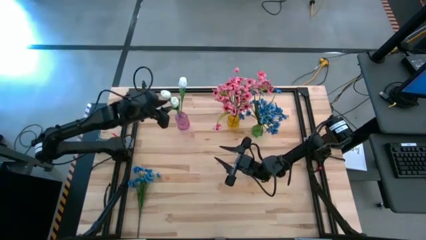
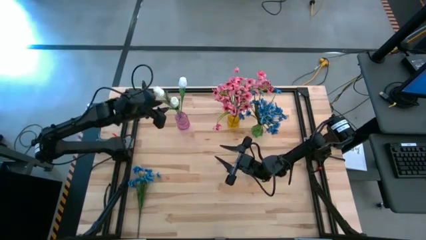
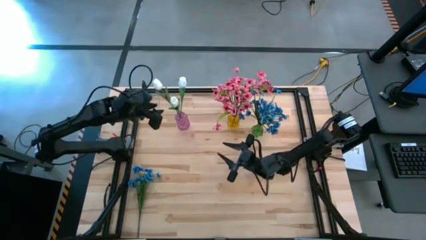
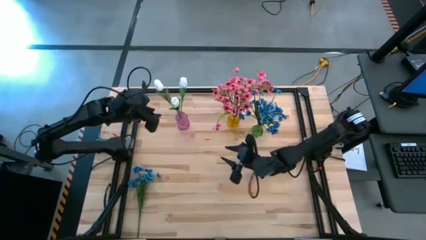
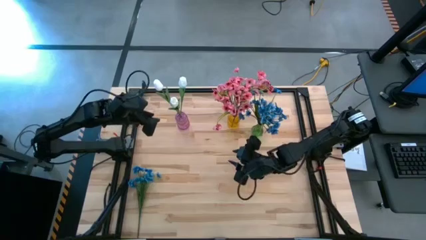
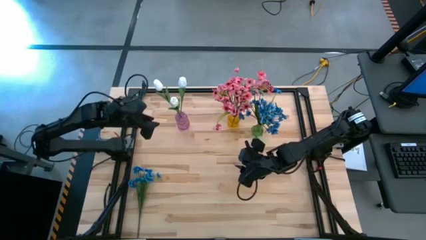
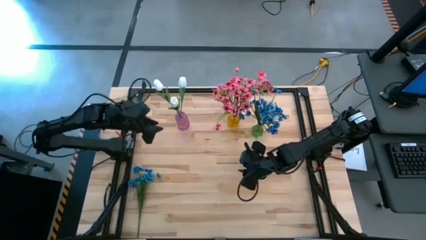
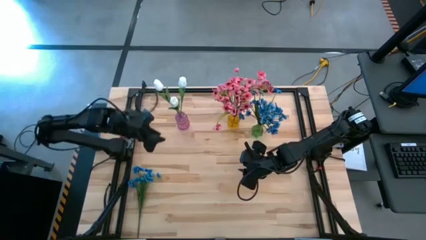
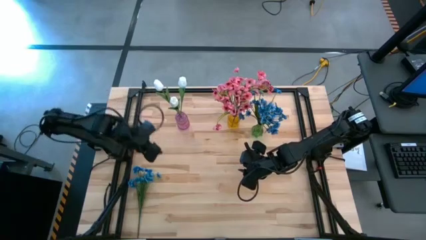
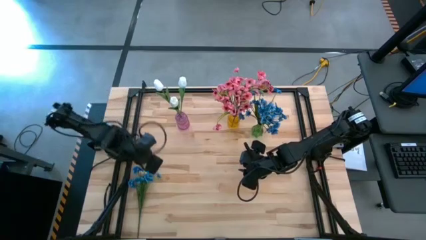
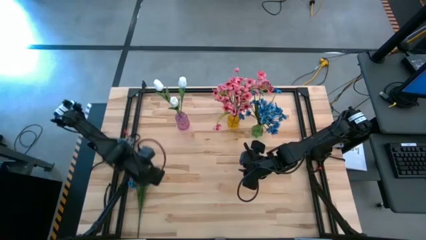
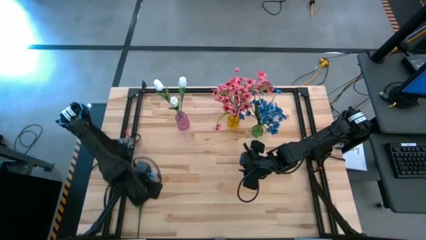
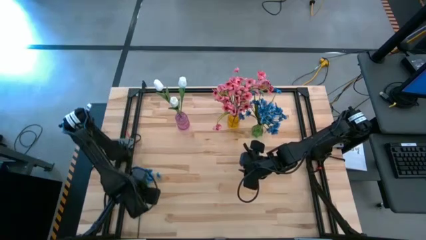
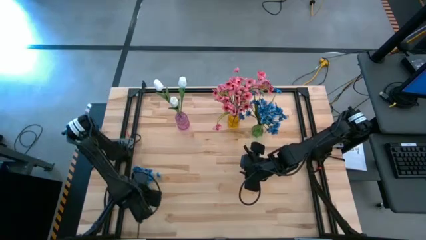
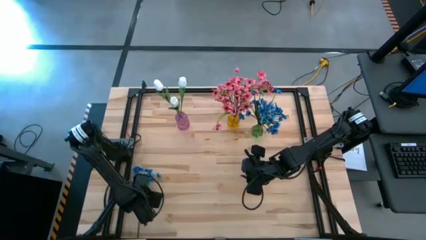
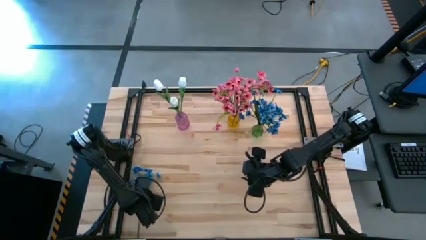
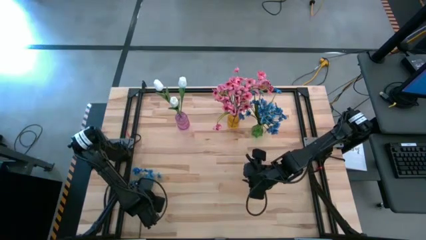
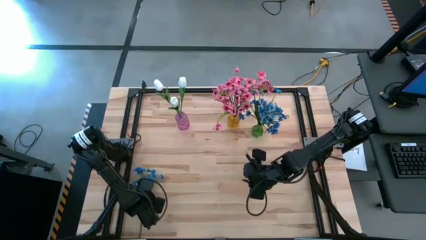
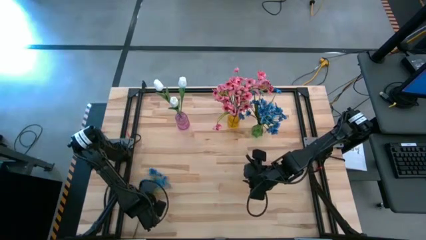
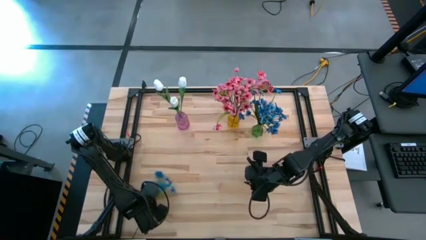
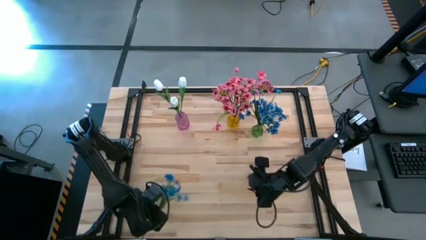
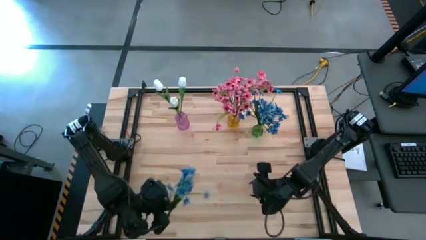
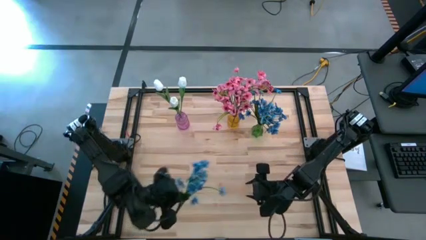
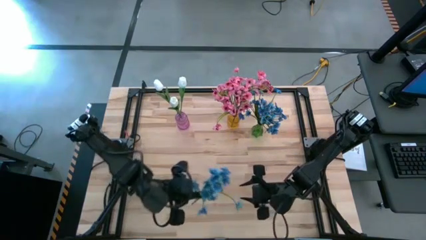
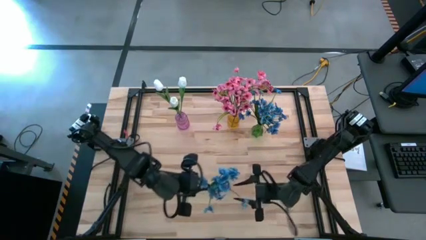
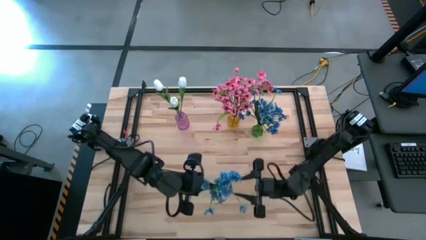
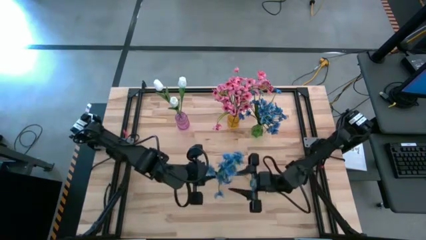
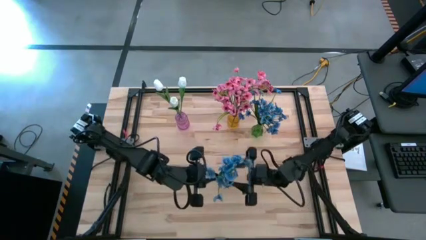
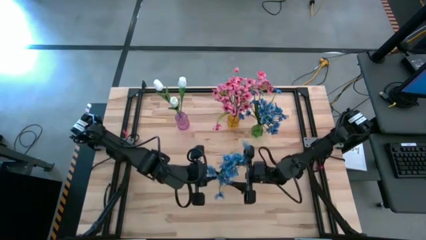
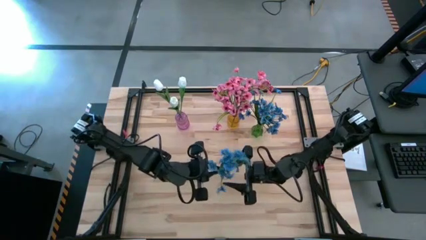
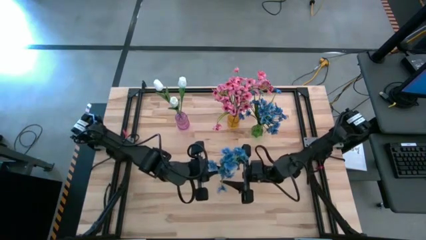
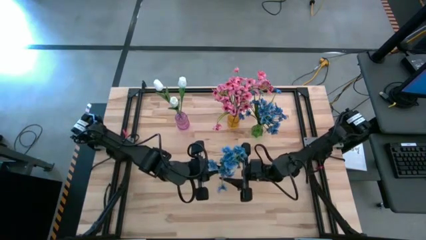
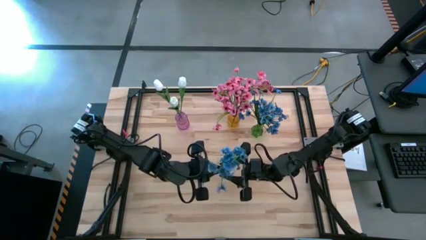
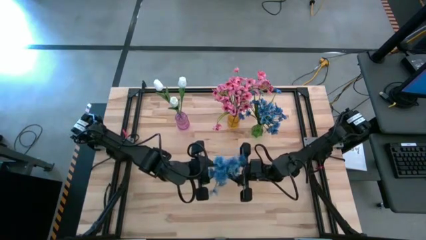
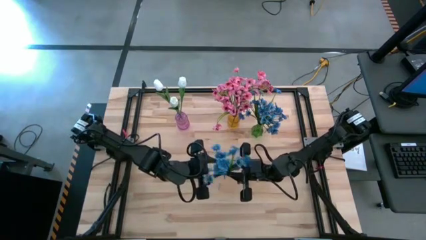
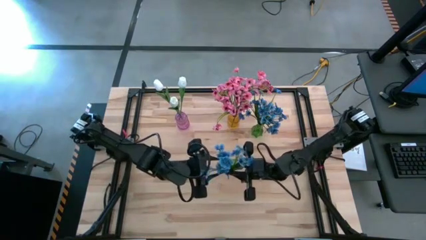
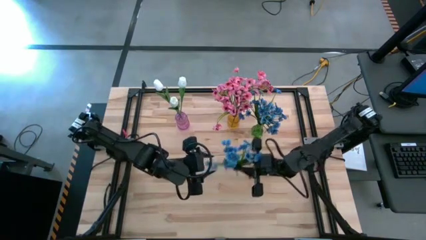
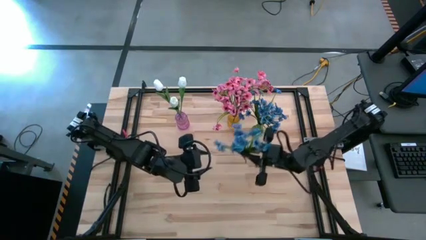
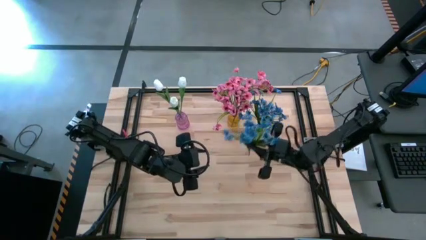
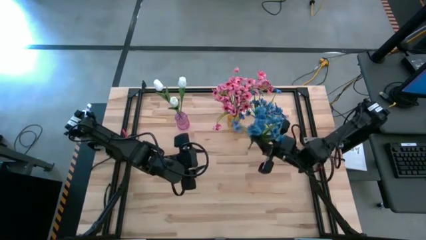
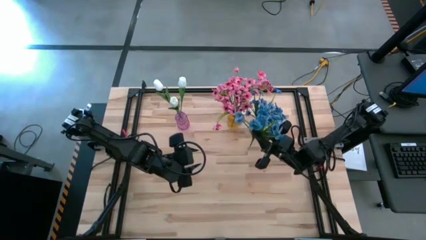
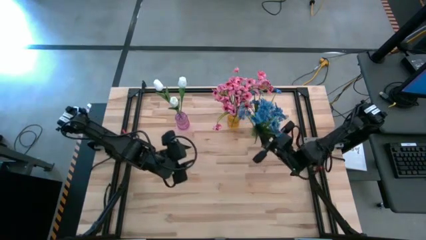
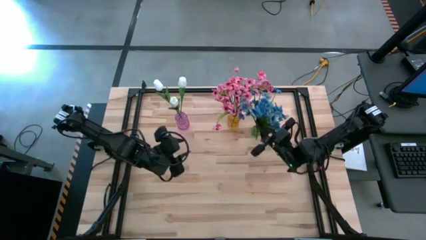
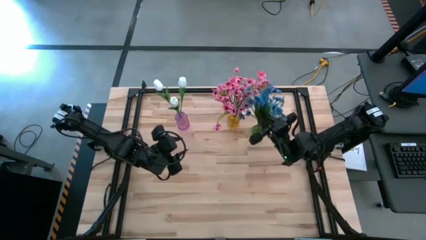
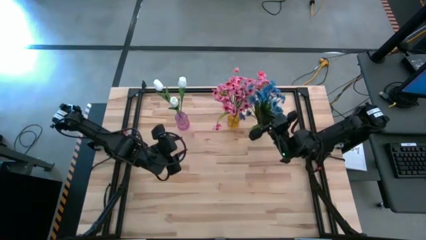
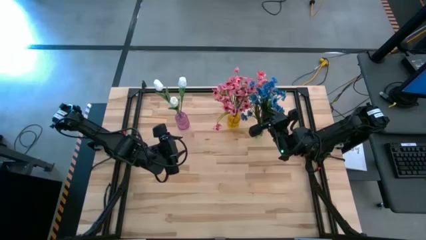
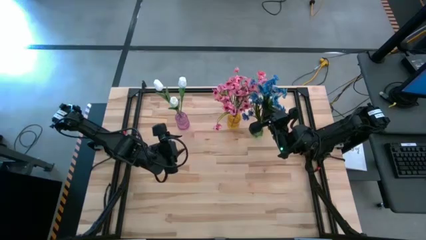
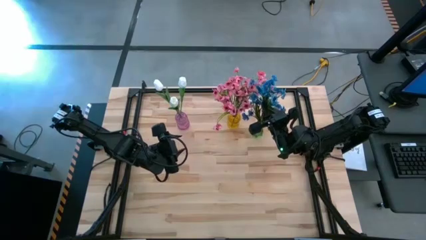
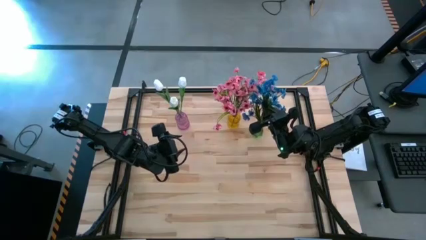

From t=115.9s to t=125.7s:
Task: Sort flowers into vase by color
Put the blue flowers into the green vase

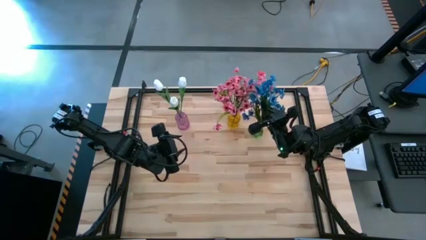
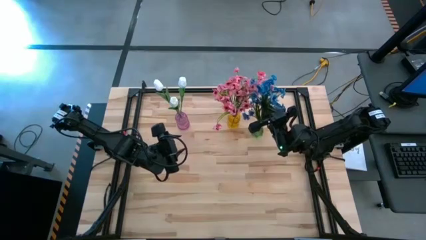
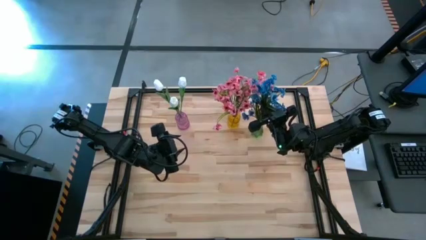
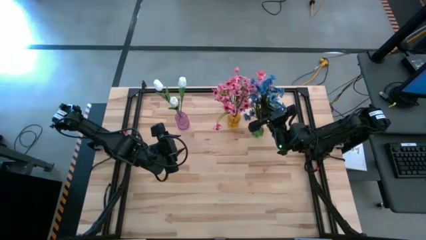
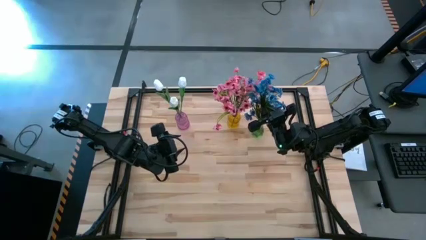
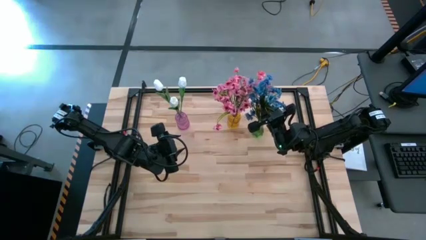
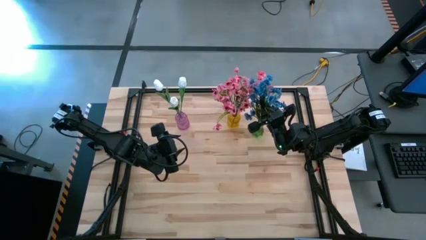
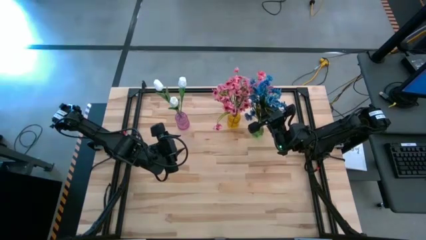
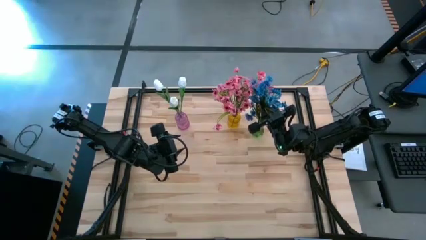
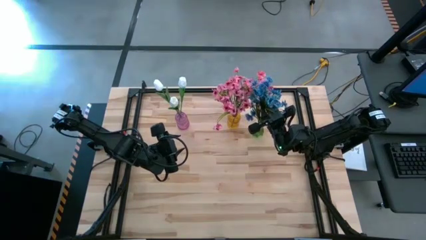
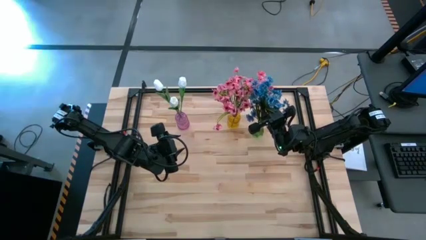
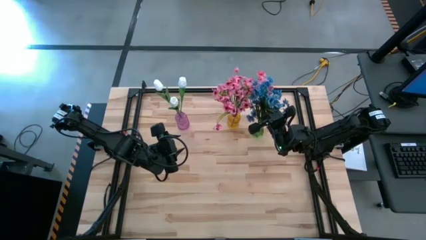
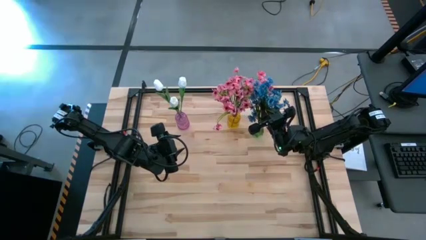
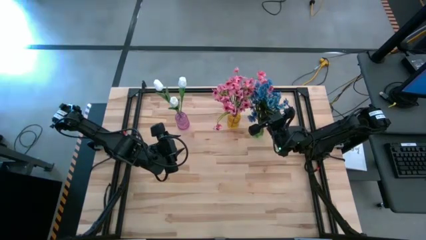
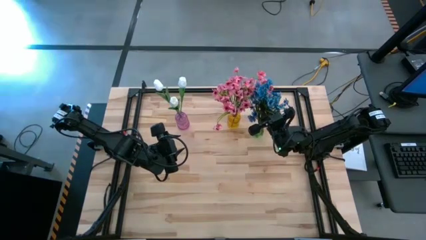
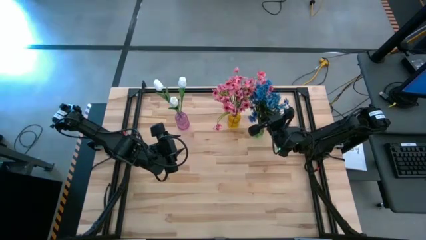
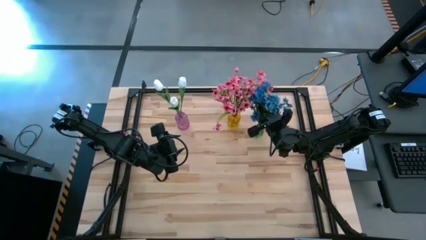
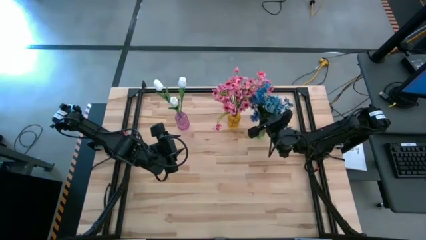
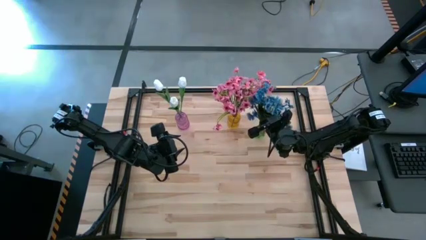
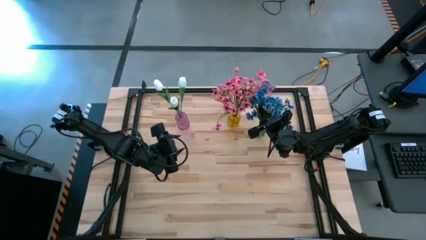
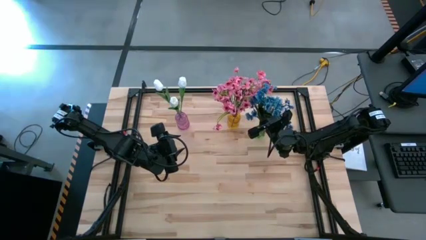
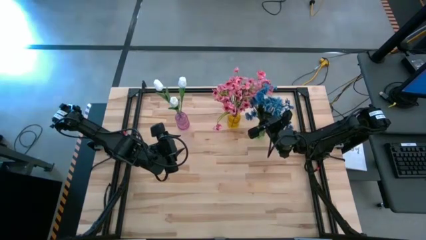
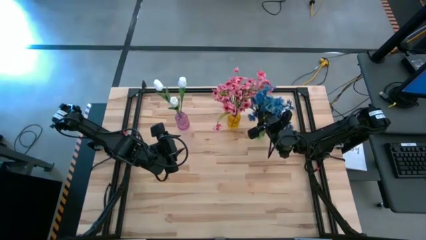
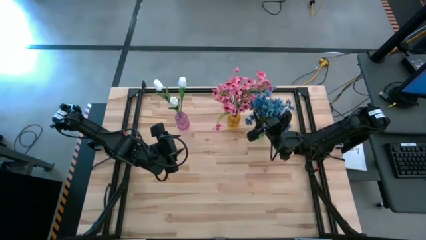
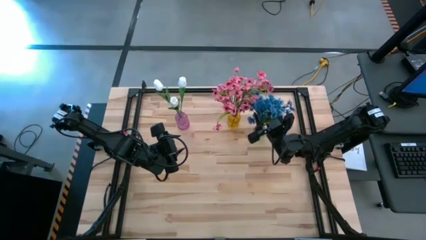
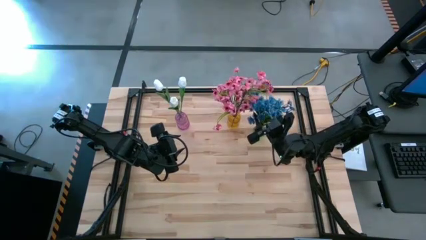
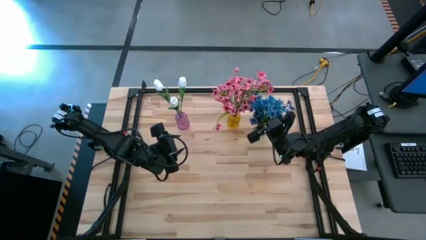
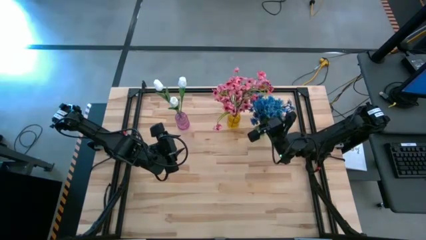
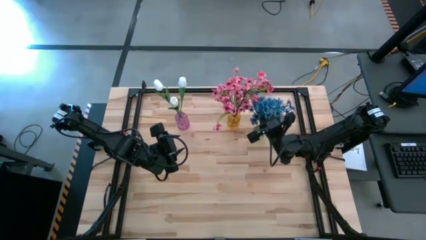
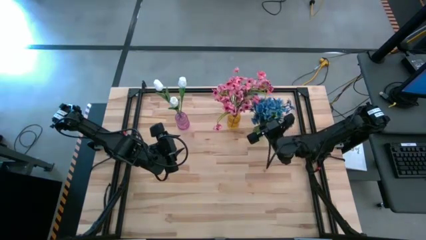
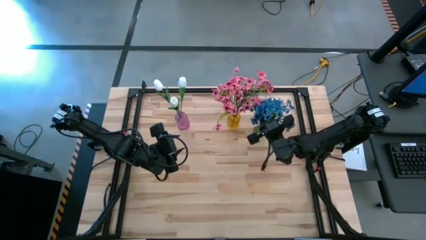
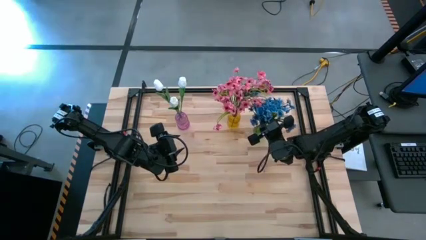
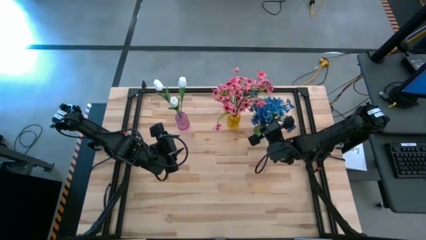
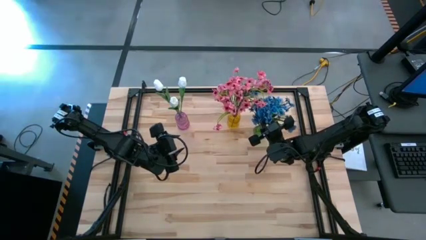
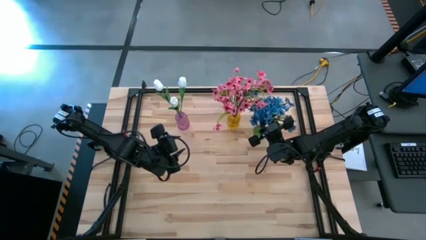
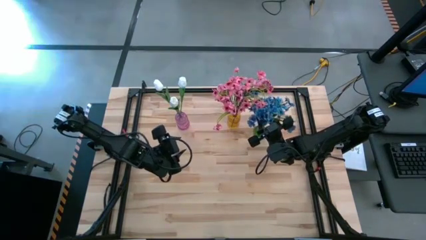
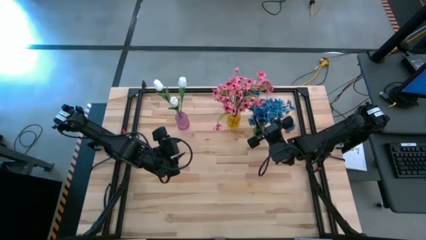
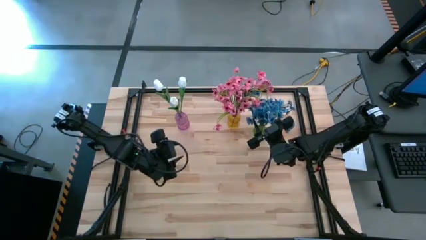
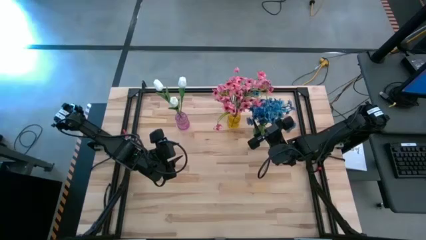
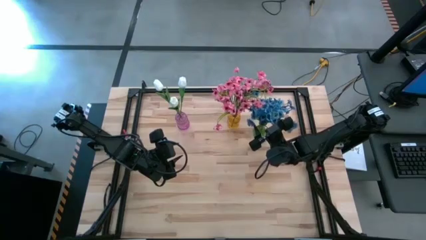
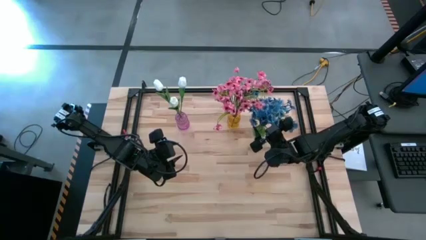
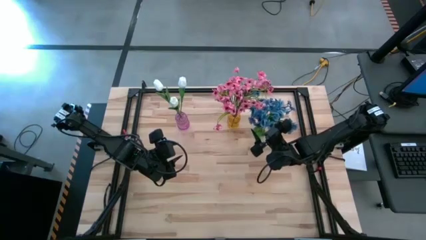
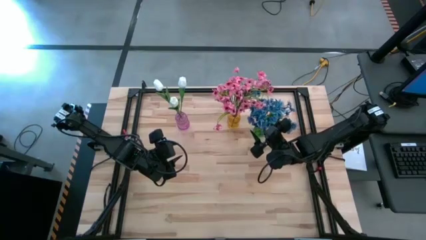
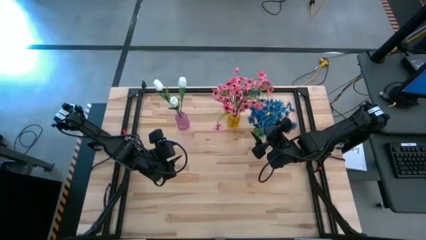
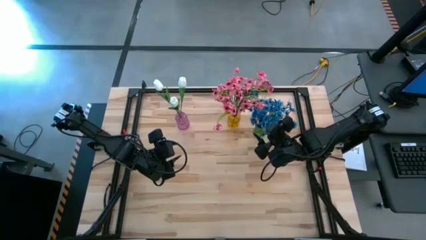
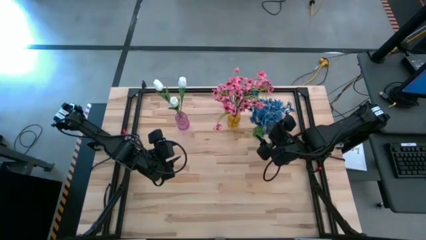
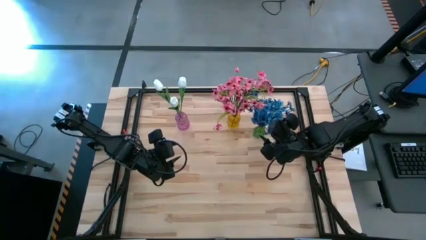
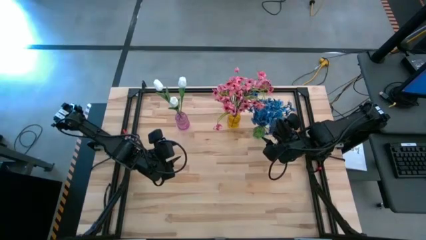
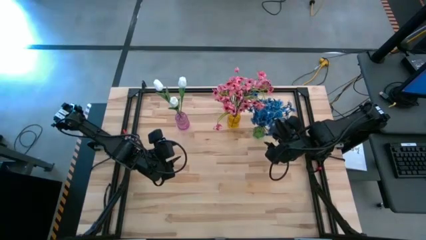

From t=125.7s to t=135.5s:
Put the blue flowers into the green vase
